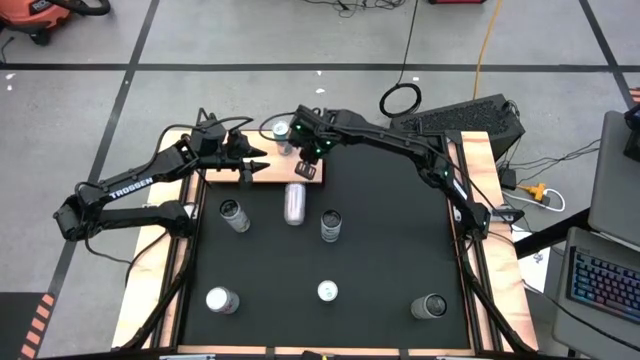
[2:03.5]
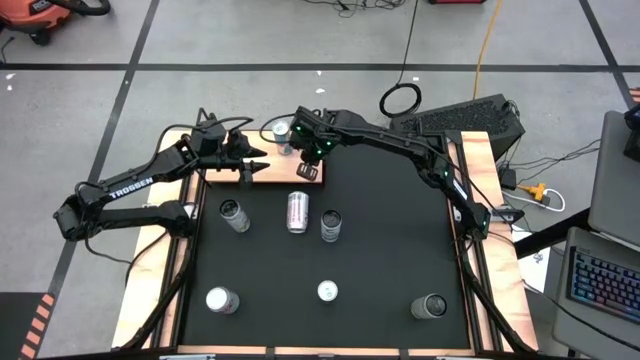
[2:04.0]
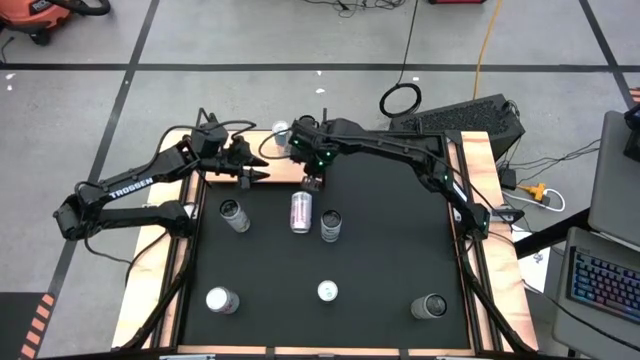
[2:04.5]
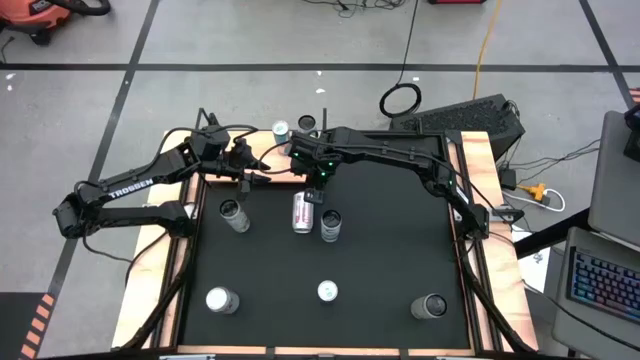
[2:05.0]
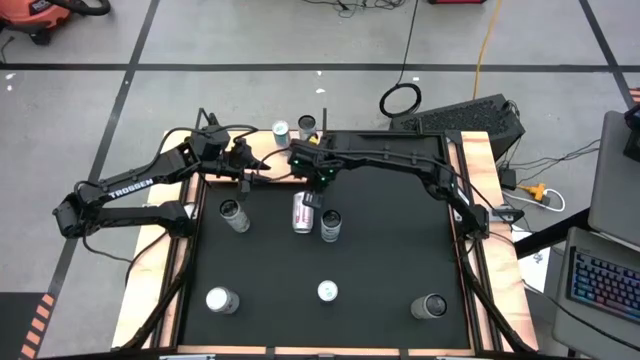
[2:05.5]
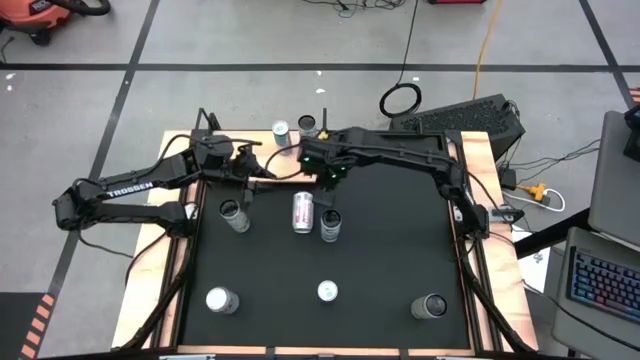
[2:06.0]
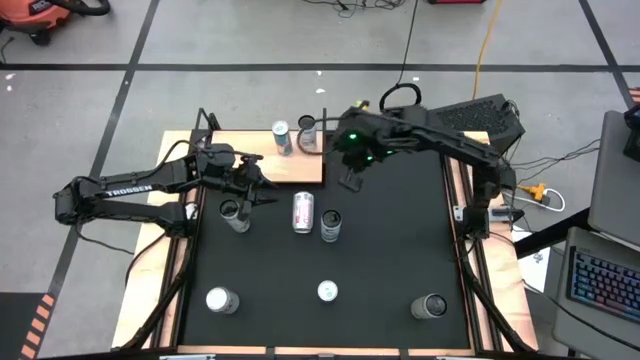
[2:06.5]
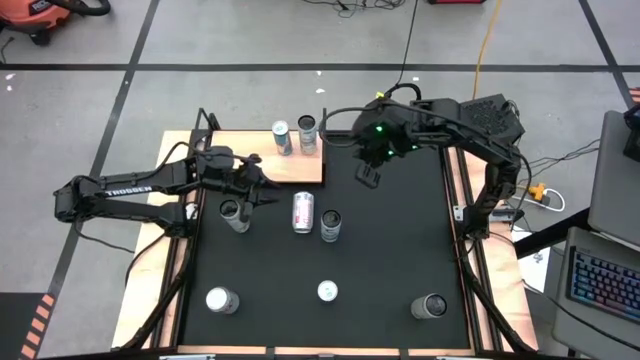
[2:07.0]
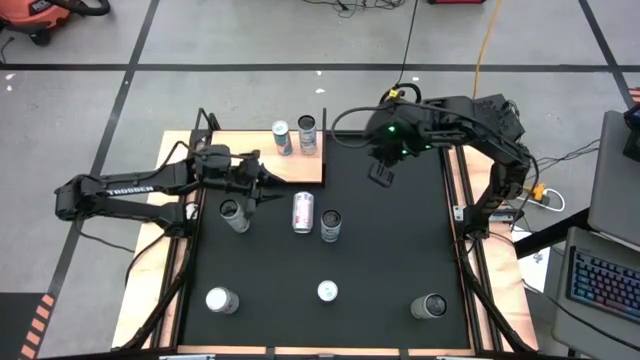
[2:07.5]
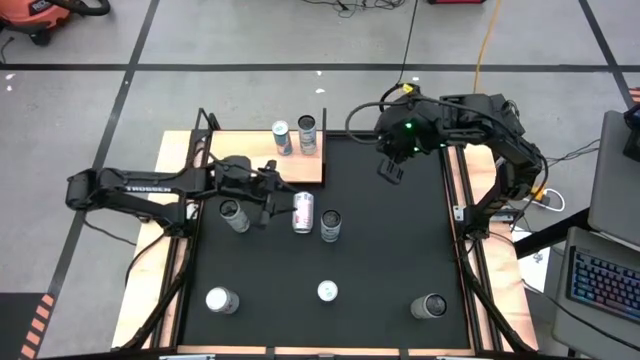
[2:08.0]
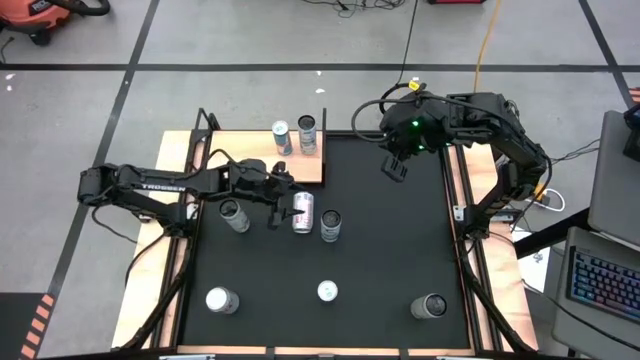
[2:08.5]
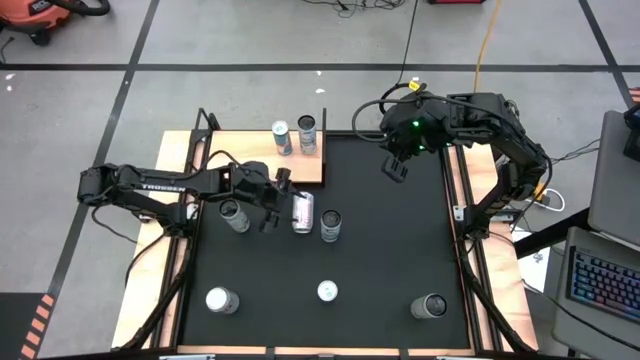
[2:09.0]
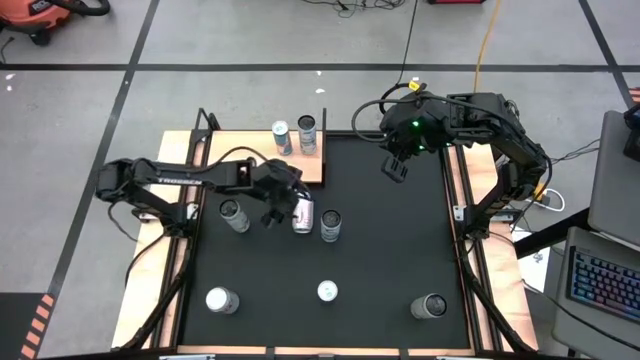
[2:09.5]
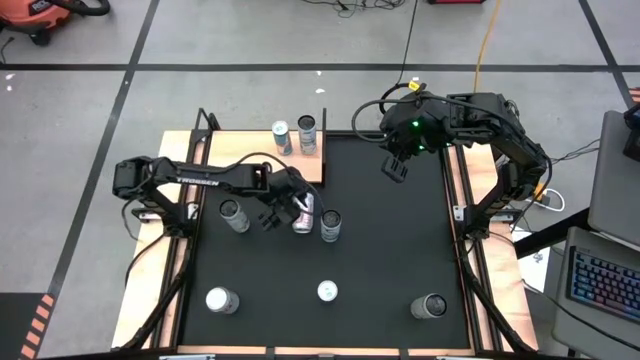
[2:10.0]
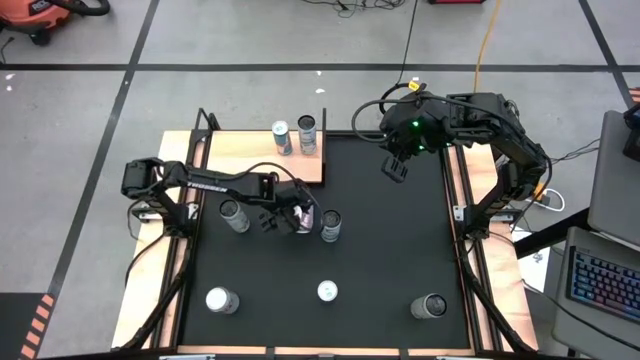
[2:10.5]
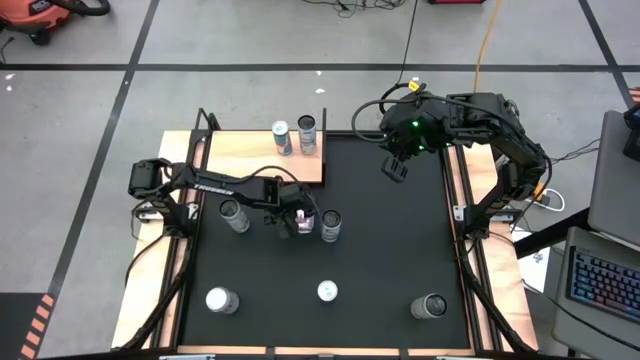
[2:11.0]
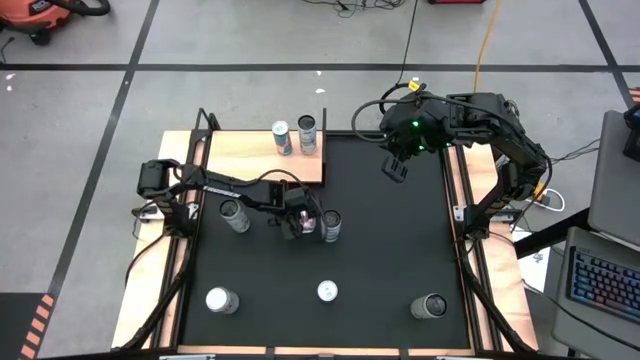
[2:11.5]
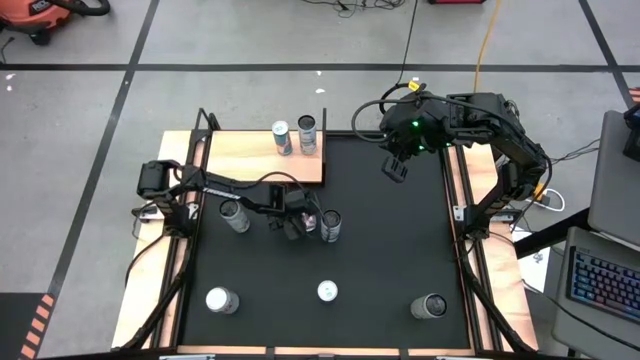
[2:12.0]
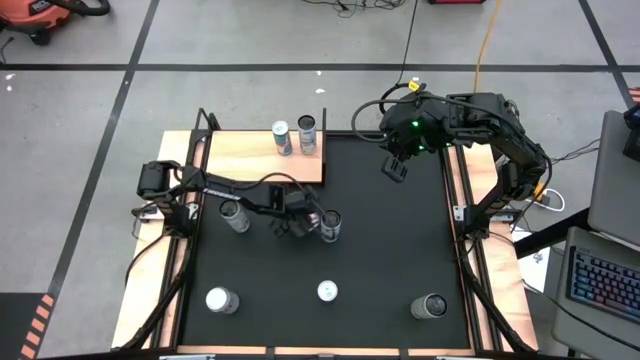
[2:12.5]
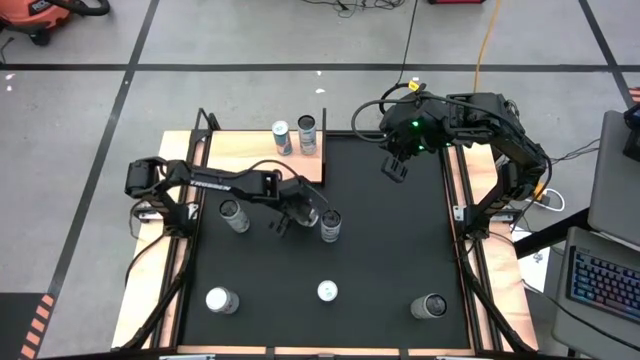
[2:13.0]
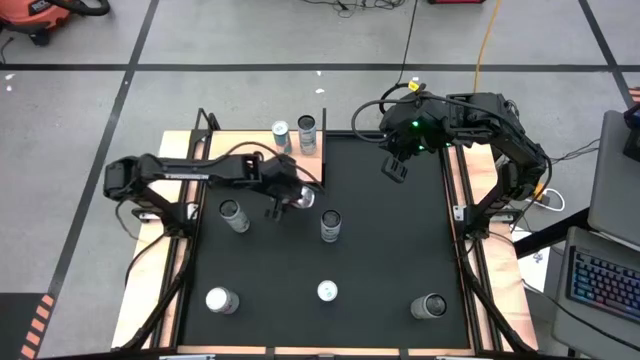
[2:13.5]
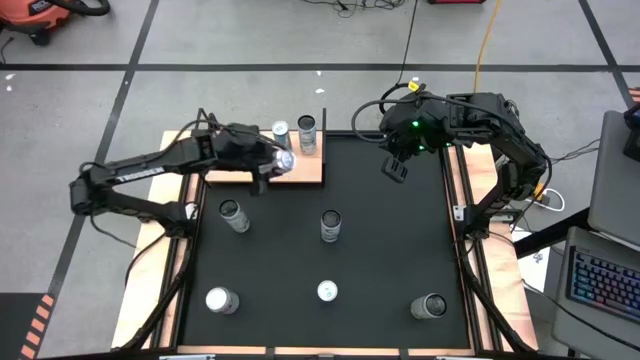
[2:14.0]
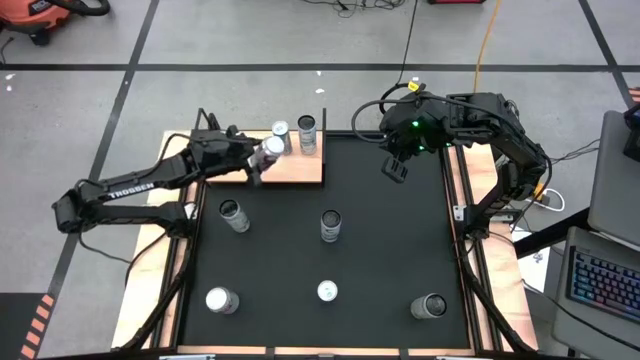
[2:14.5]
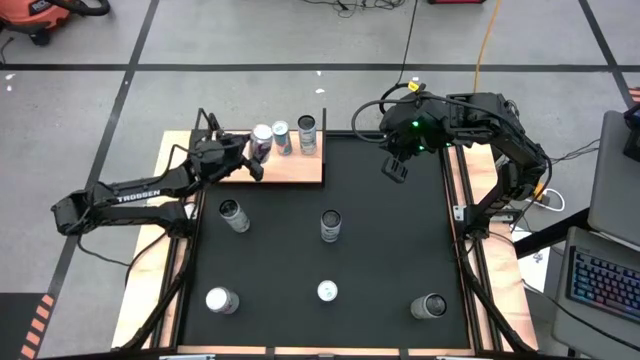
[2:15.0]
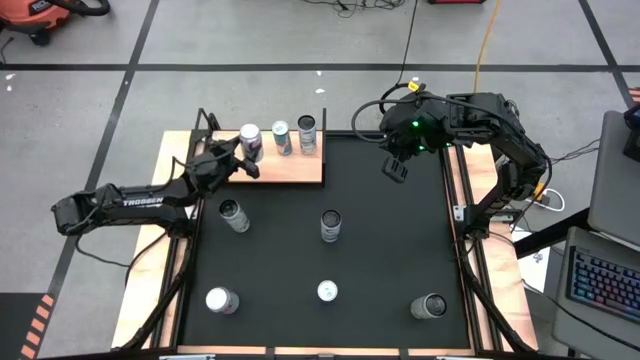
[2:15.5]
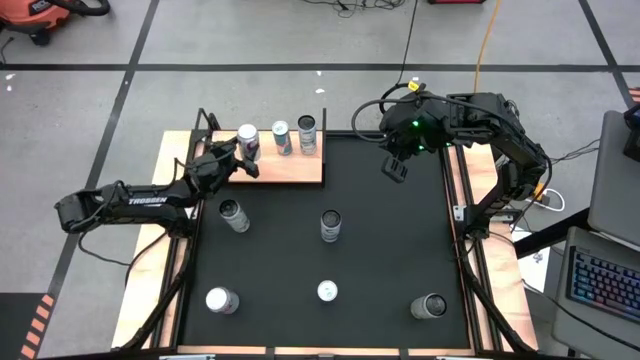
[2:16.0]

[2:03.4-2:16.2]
Task: Place canned beverage on shelf
Put the top red-silver soda can on the shelf

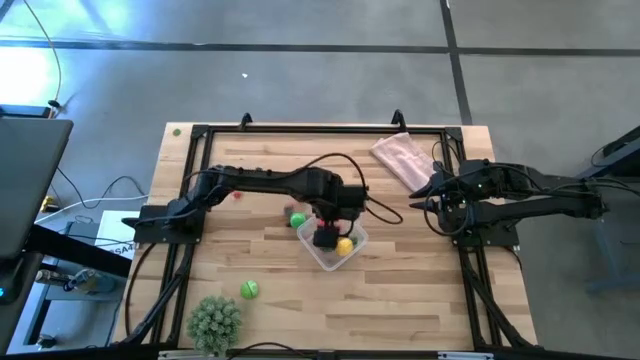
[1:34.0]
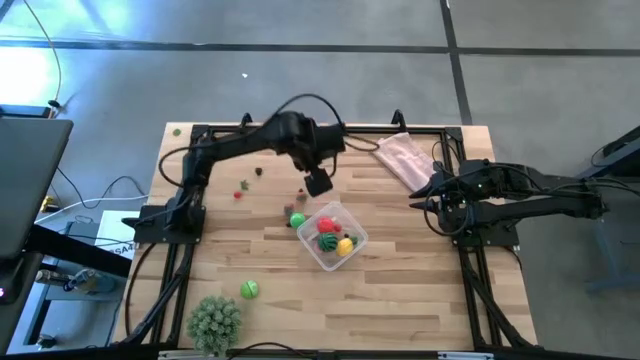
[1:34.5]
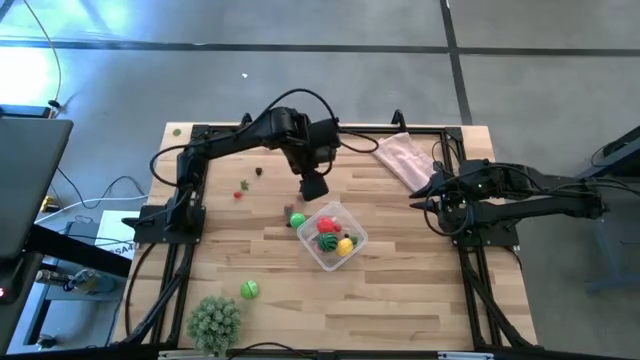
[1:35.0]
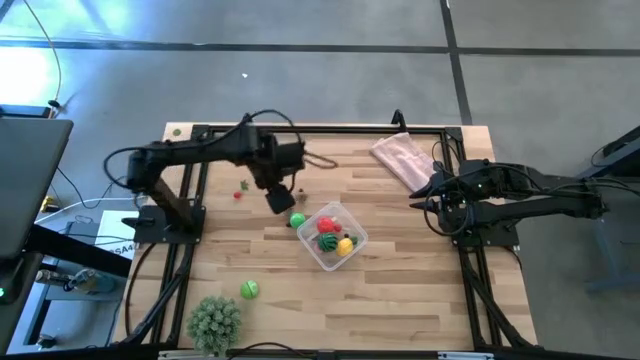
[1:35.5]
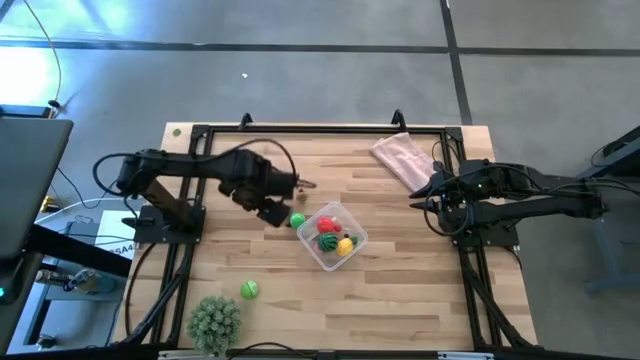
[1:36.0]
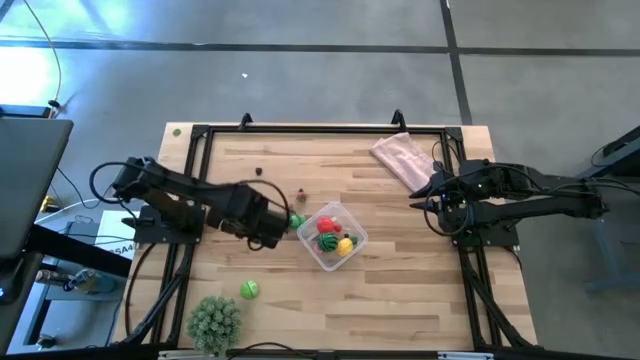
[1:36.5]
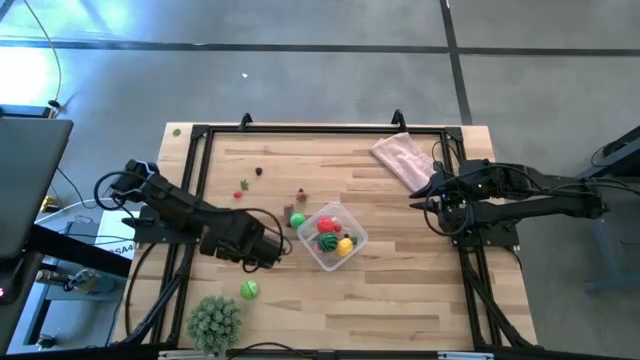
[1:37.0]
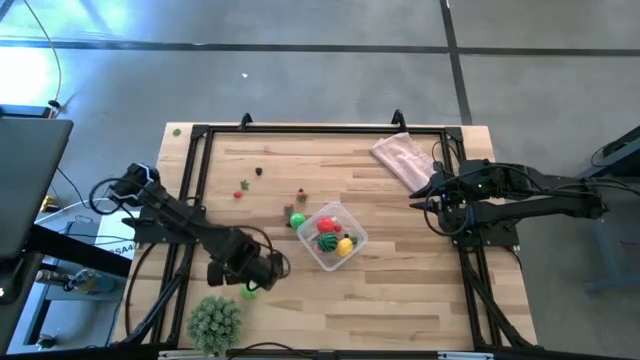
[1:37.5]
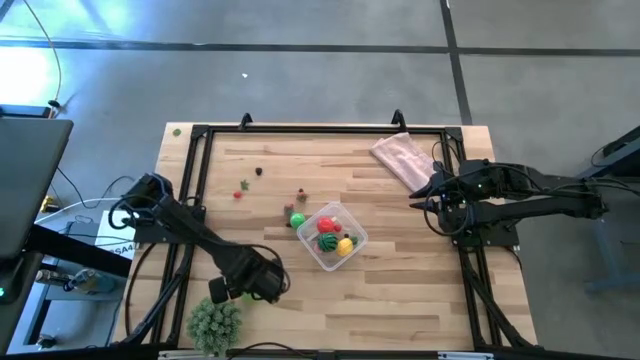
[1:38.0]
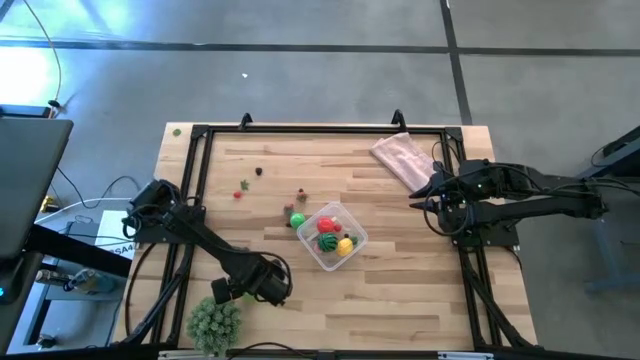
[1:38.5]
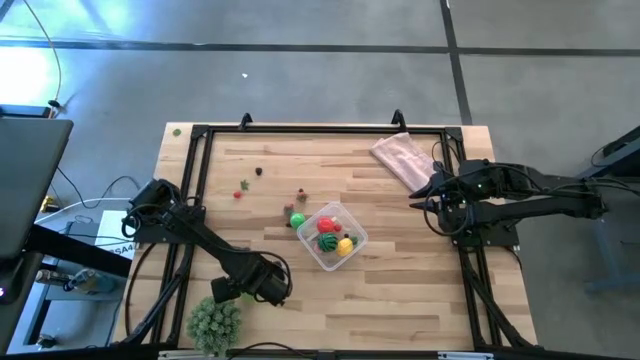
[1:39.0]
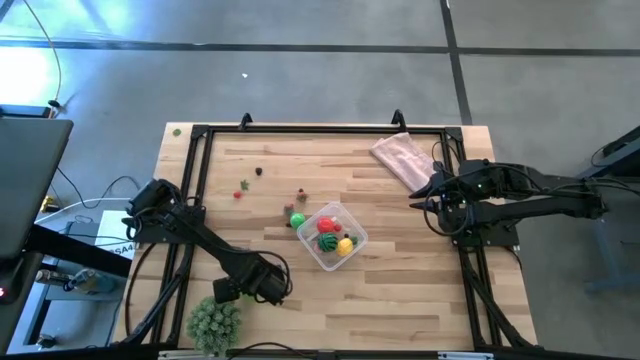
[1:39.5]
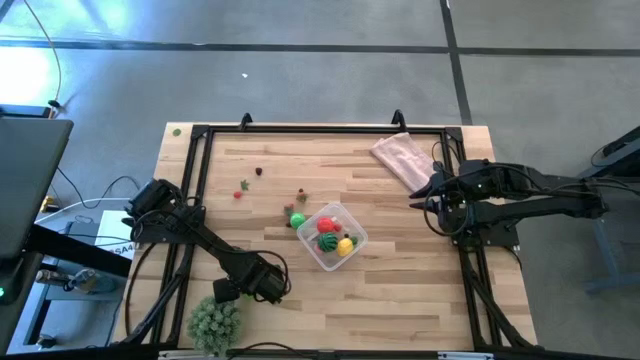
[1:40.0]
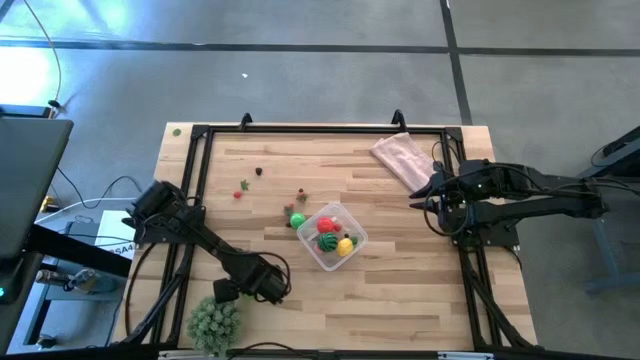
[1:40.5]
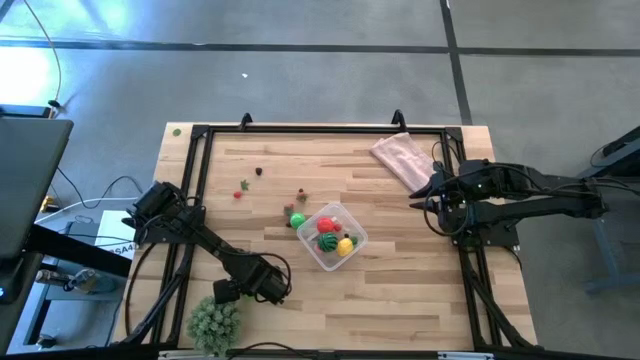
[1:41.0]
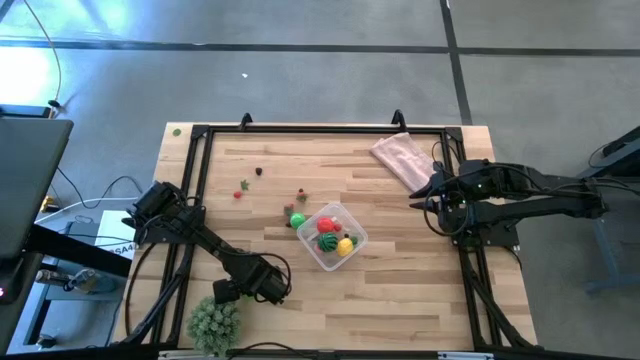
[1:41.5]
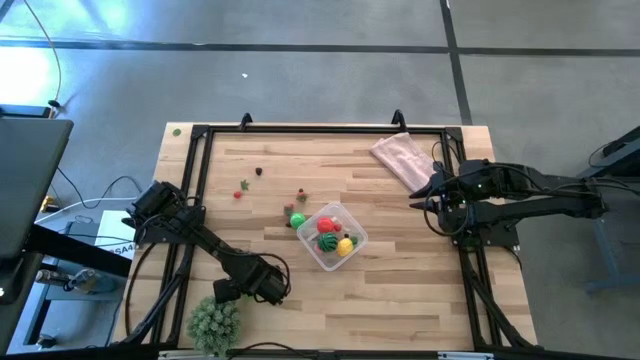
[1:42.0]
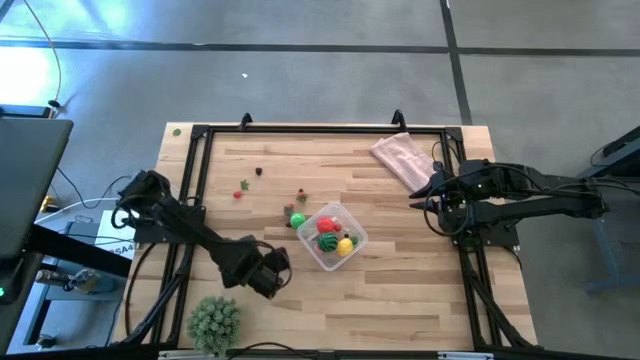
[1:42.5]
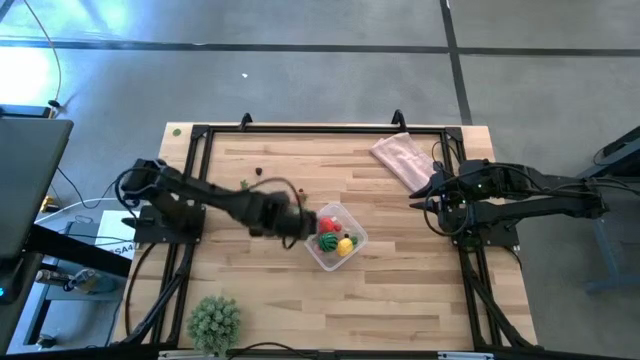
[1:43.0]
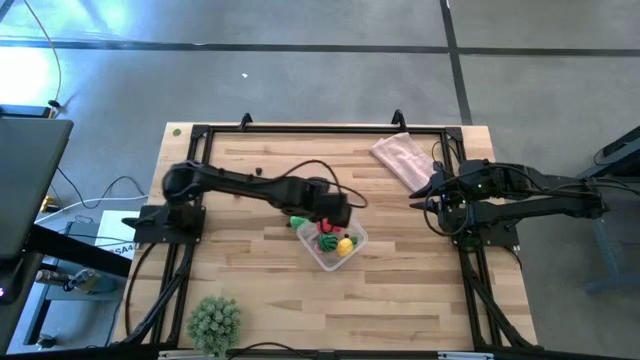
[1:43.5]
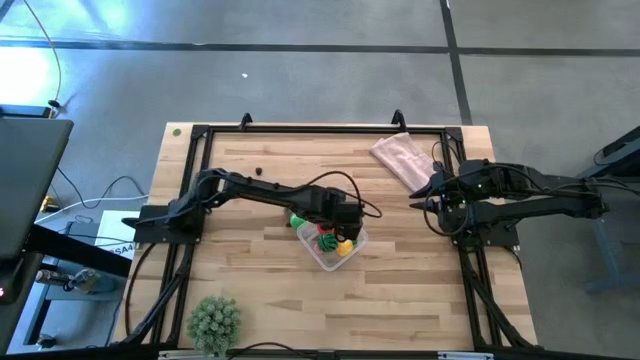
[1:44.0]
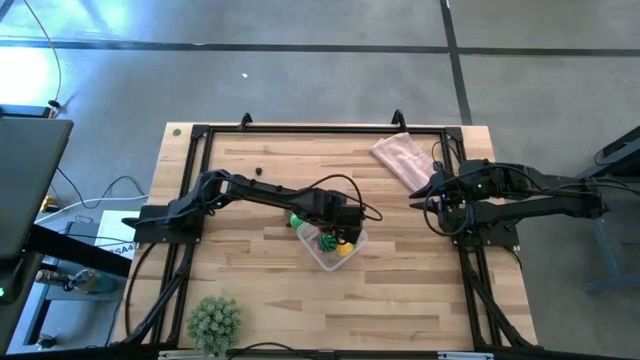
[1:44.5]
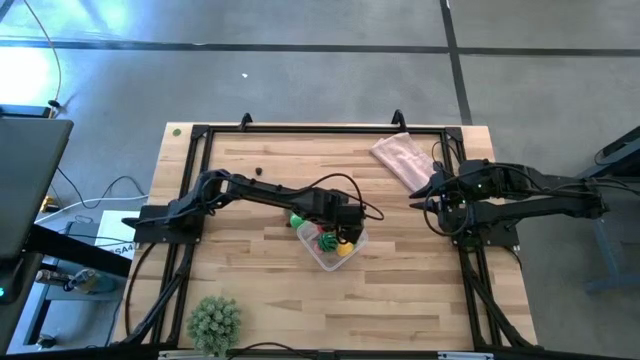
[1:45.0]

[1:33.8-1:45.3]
Task: Pick and placing Produce into tupperware
Put the green cabbage into the transparent container
